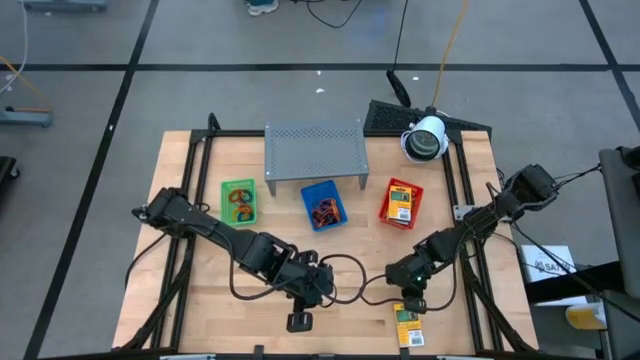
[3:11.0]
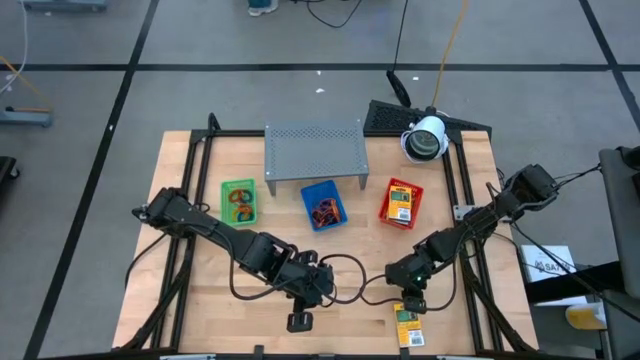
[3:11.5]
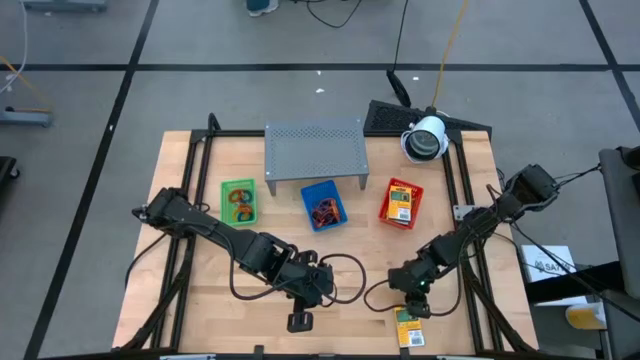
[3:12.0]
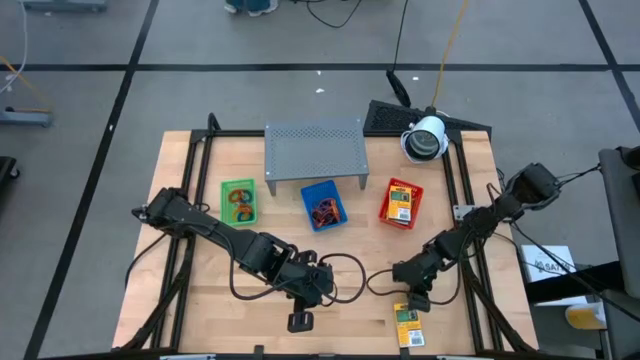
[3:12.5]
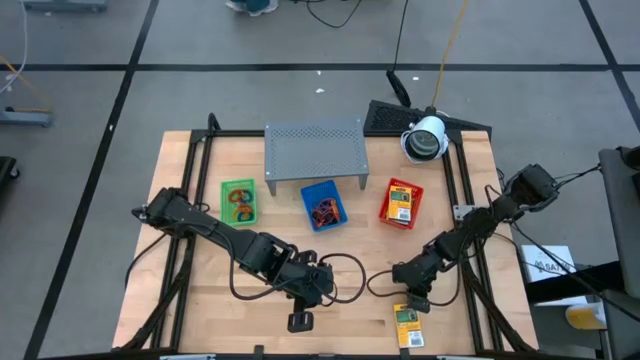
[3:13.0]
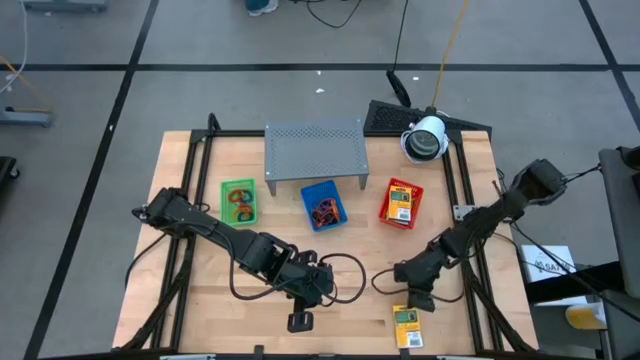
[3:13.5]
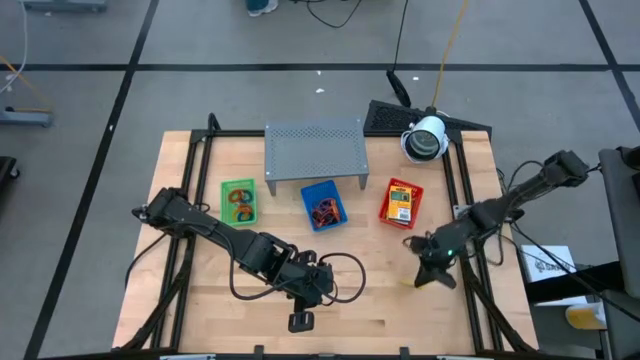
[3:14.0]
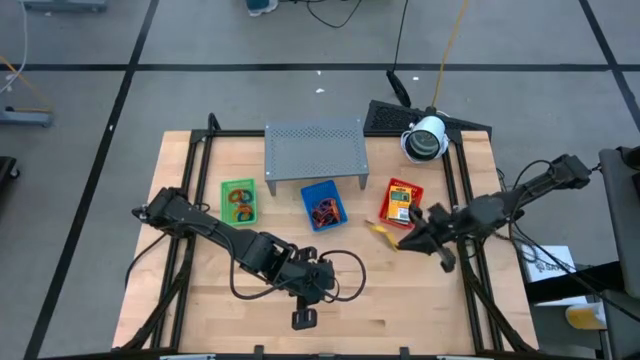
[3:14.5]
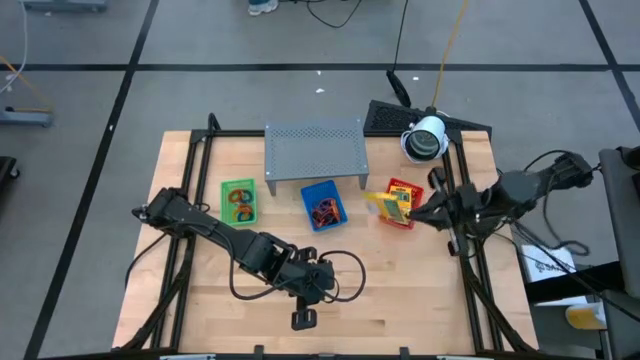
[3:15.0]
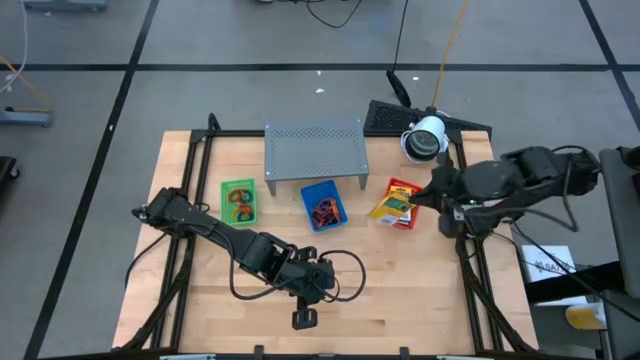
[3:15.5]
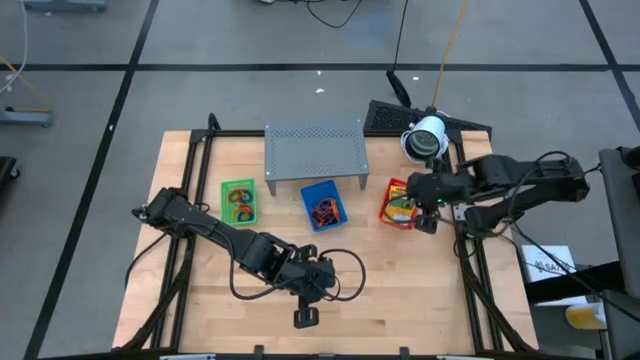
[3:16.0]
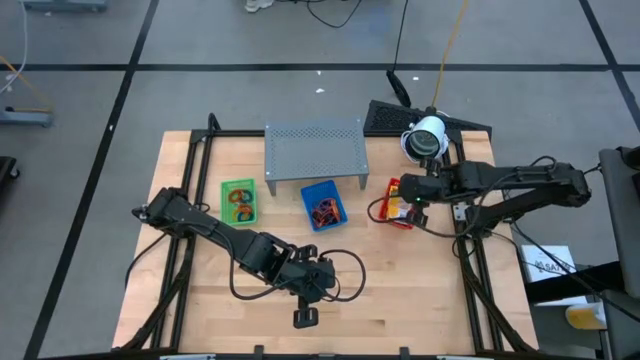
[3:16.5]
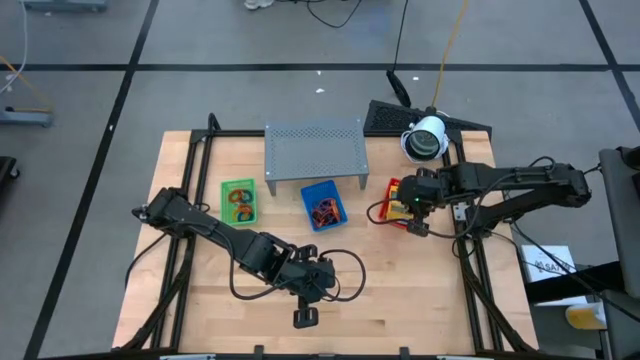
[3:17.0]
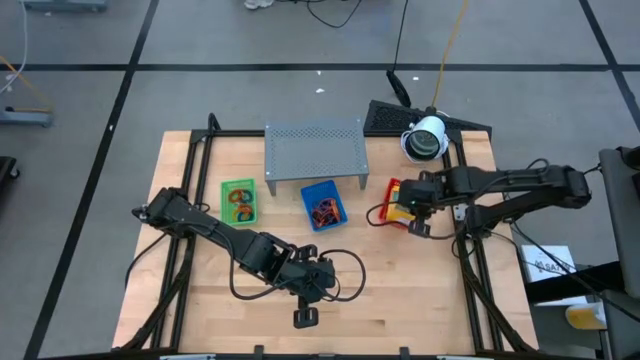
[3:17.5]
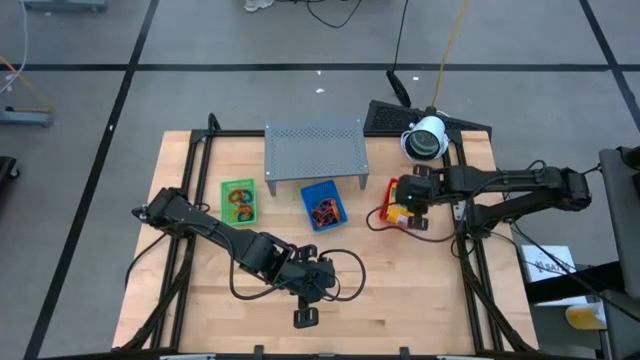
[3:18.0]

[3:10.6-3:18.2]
Task: Pick & Place Office Desk Supplies
Put the crayon pack into the orange bin

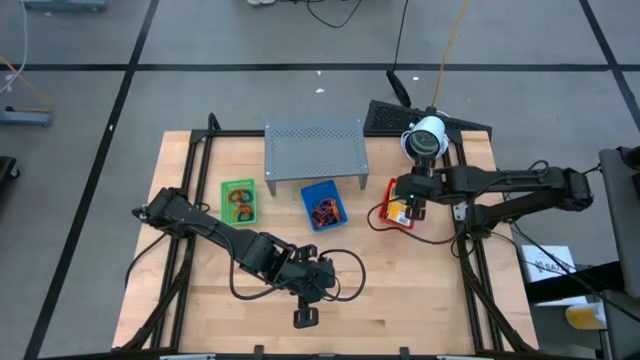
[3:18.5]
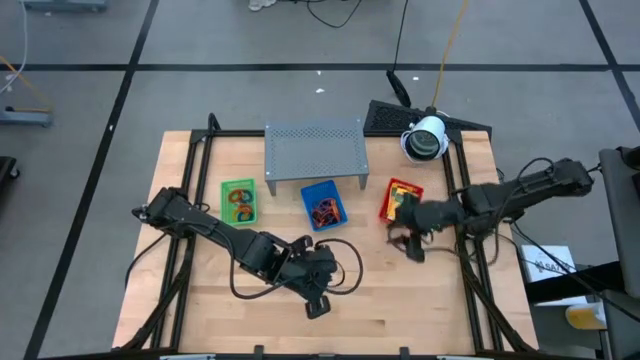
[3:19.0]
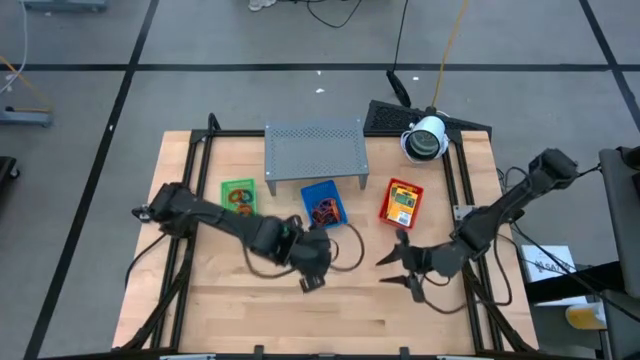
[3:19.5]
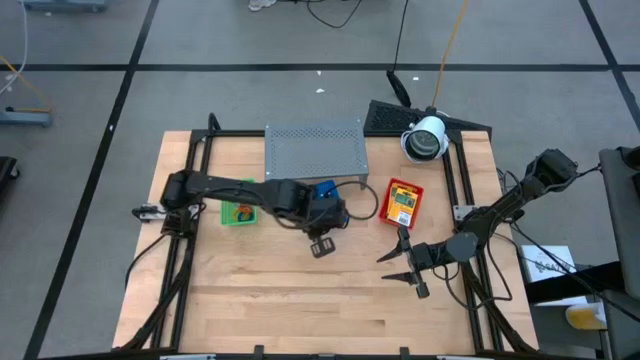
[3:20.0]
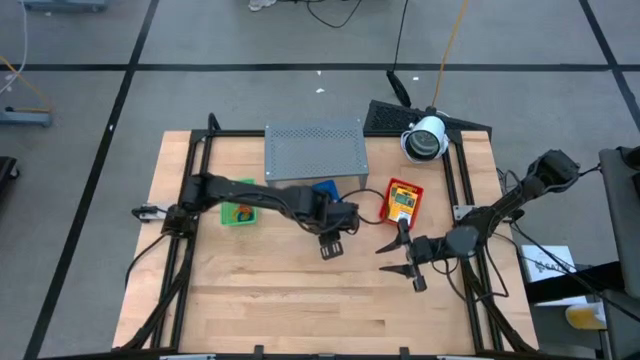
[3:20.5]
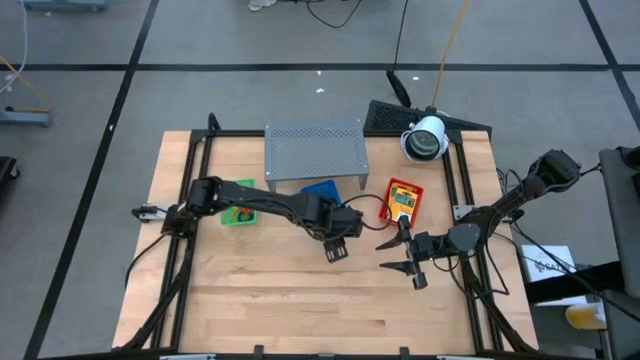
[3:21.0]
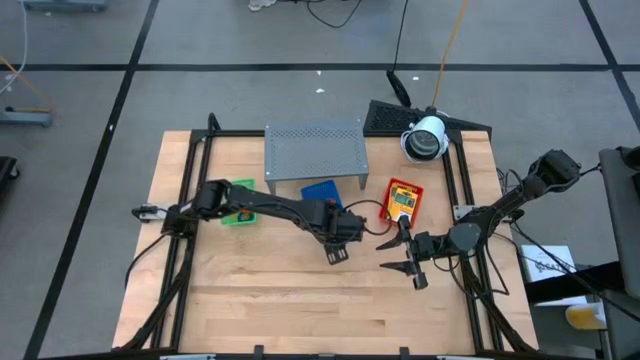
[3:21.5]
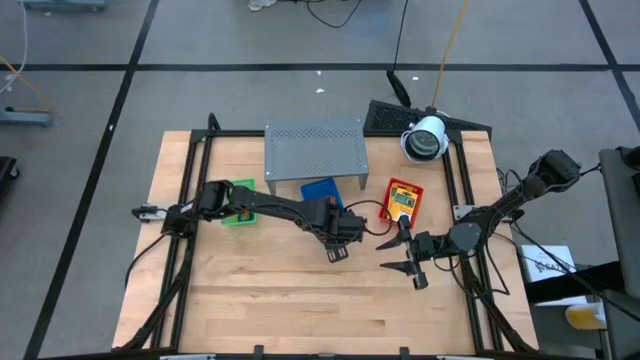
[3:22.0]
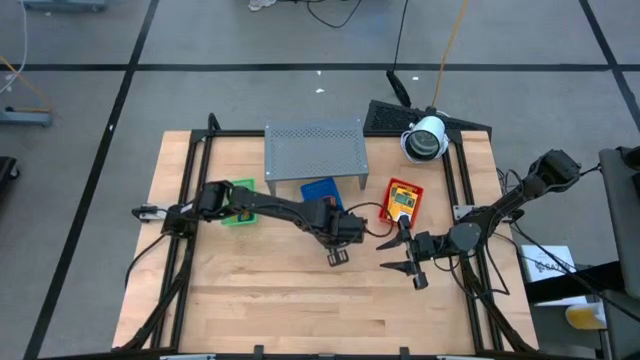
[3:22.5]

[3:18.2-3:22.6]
Put the blue bin on the shelf

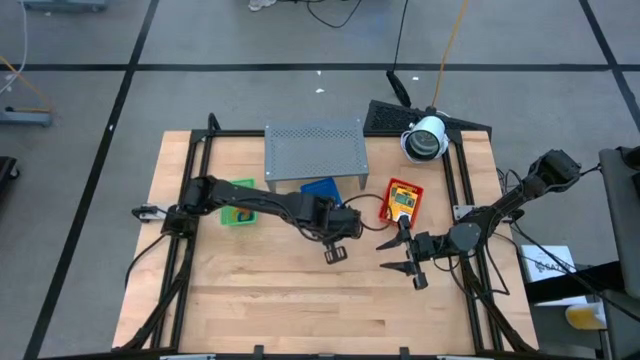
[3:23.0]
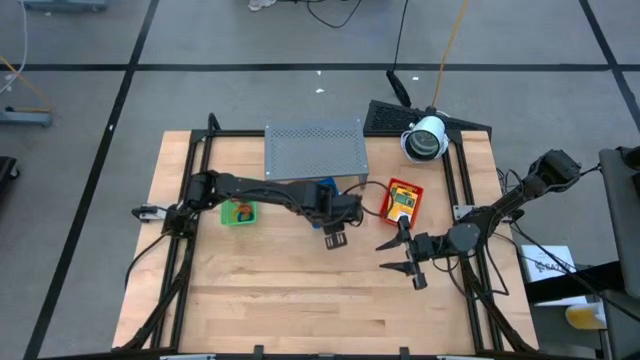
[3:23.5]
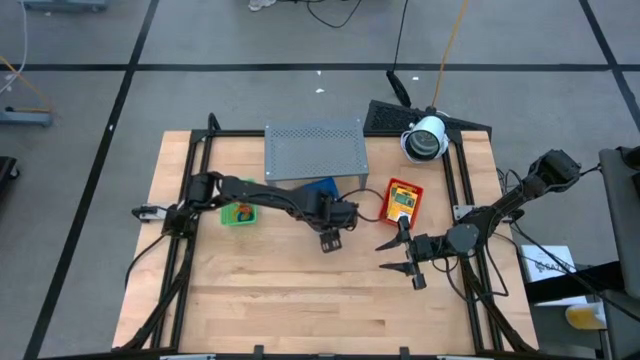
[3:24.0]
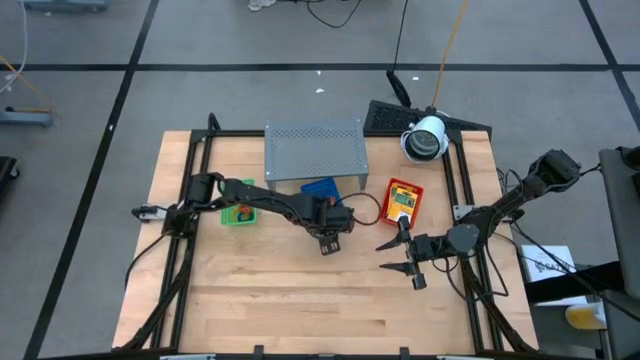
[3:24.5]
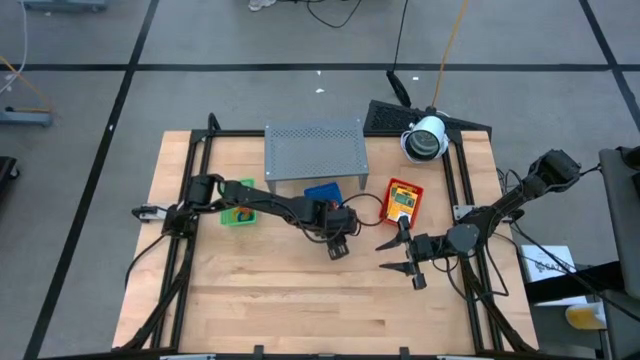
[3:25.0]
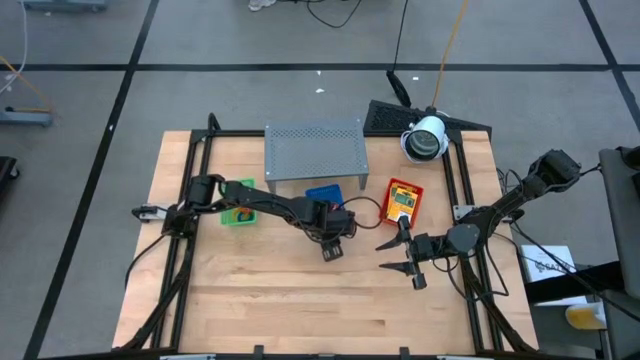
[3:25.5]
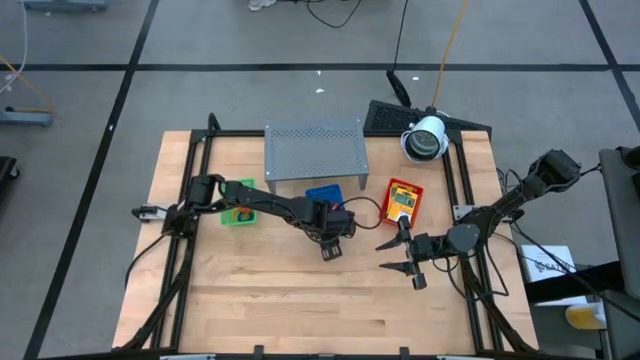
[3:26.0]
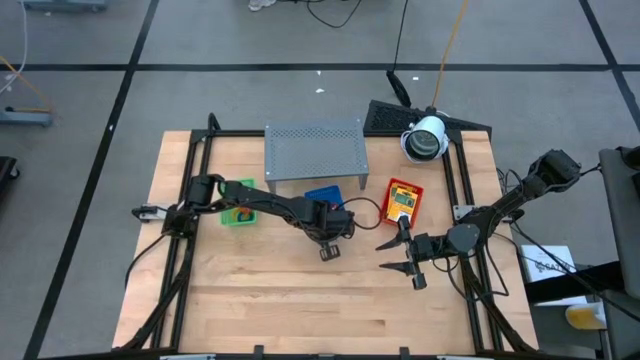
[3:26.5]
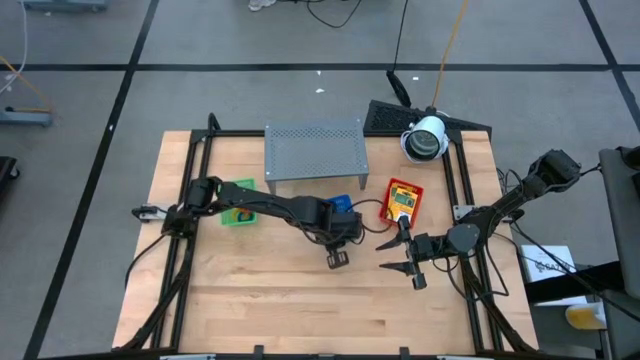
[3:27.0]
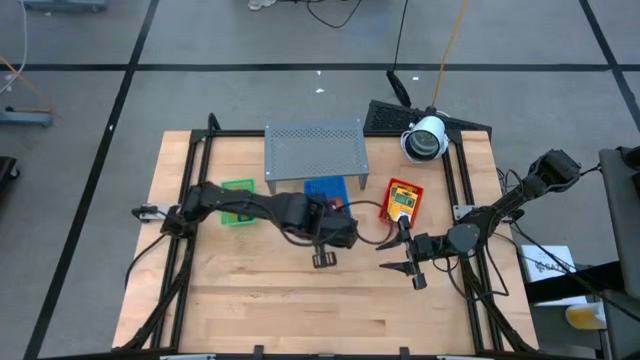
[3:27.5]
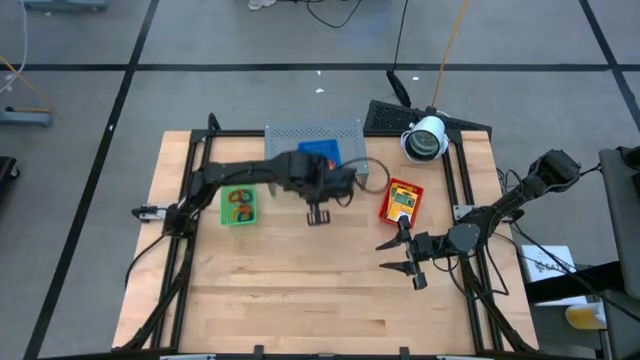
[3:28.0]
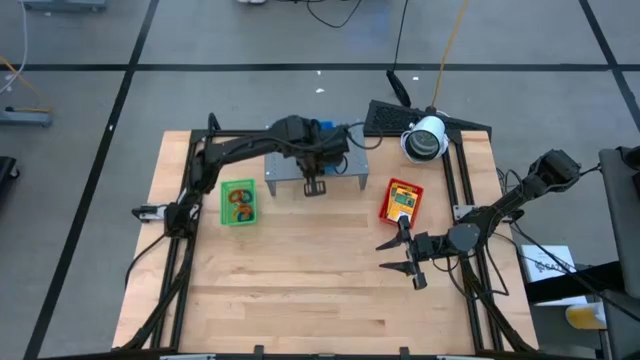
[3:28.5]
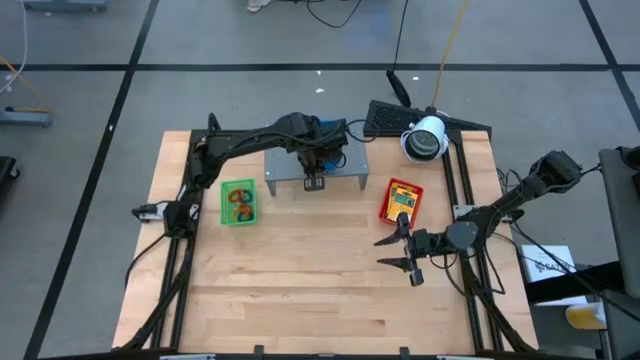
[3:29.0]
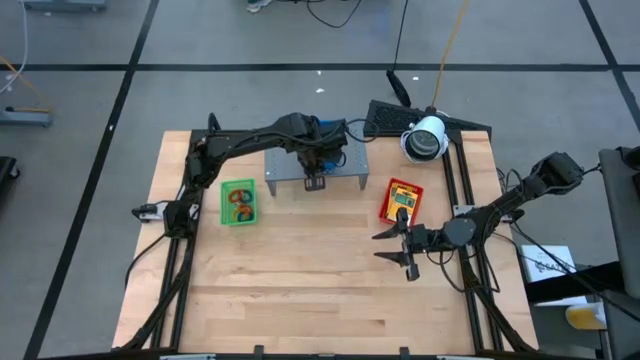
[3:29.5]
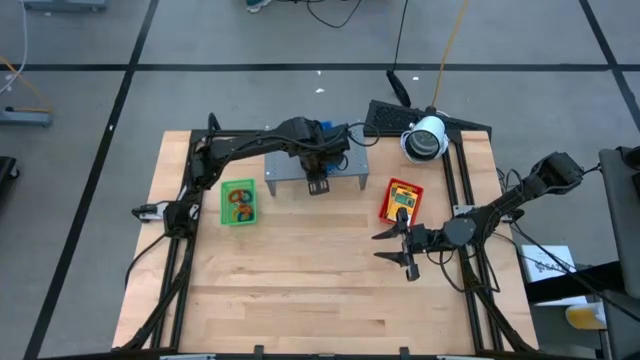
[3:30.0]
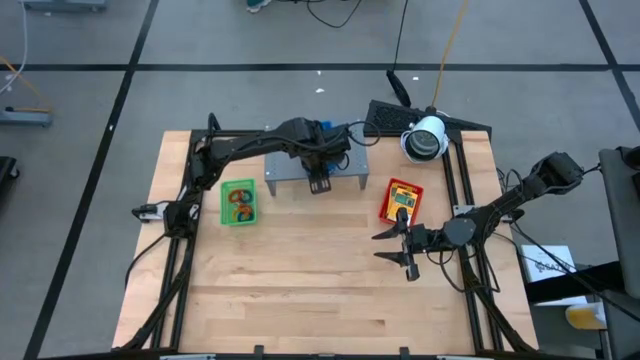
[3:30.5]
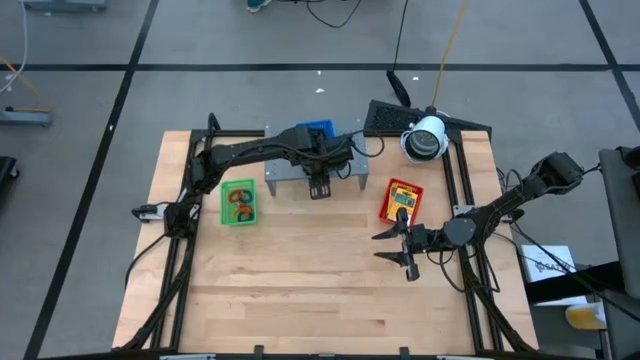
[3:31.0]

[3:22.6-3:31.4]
Put the blue bin on the shelf
